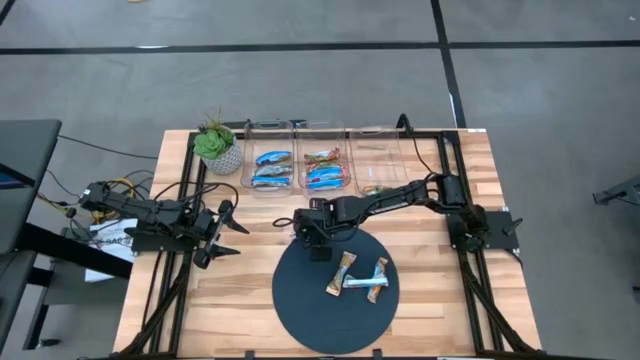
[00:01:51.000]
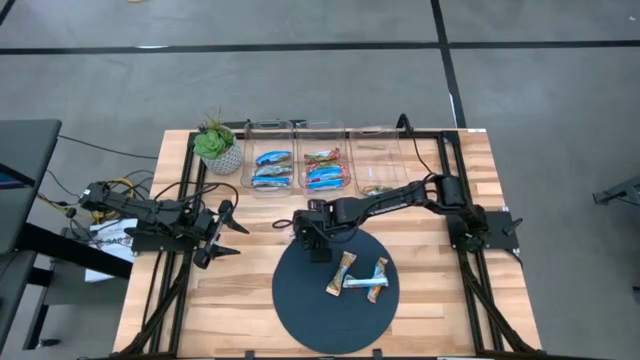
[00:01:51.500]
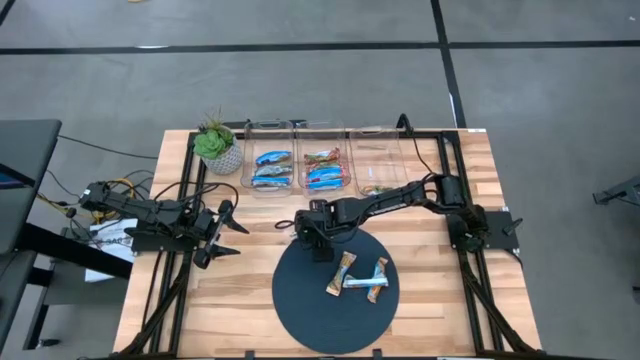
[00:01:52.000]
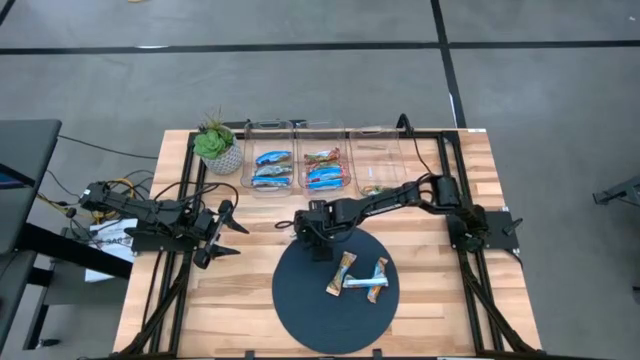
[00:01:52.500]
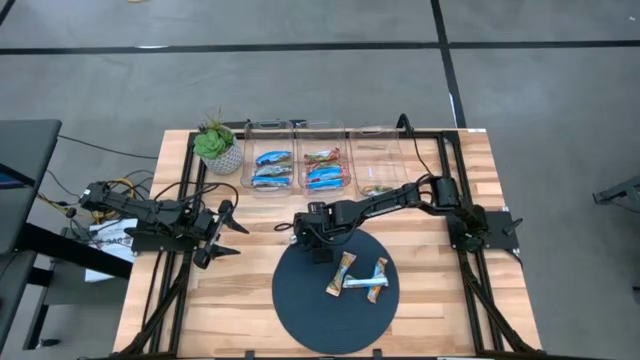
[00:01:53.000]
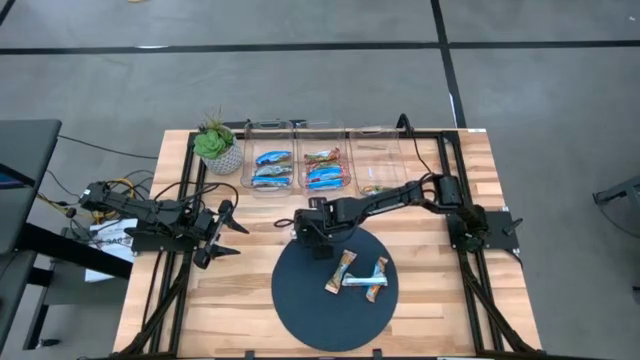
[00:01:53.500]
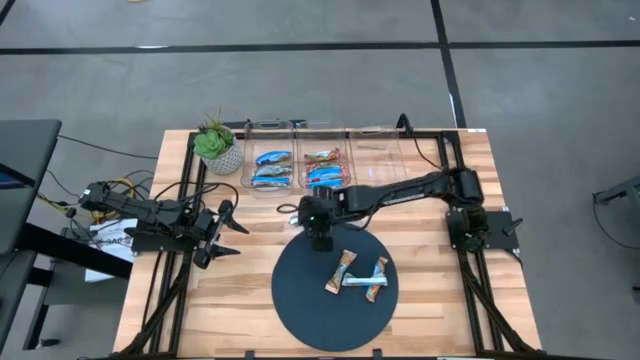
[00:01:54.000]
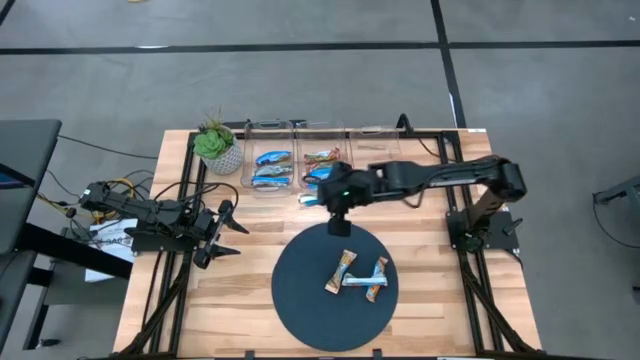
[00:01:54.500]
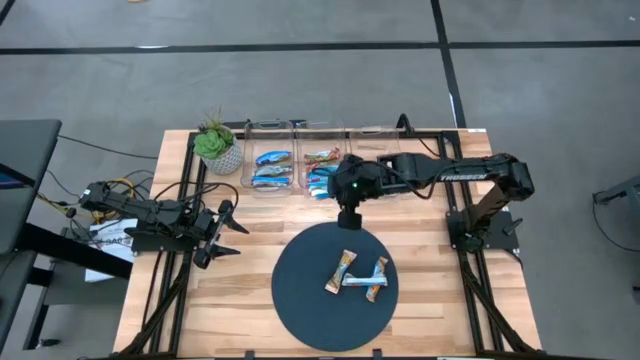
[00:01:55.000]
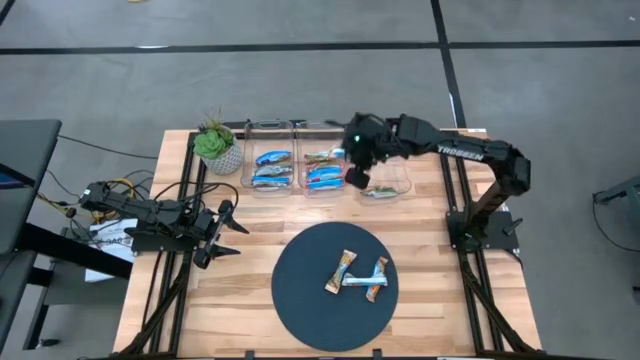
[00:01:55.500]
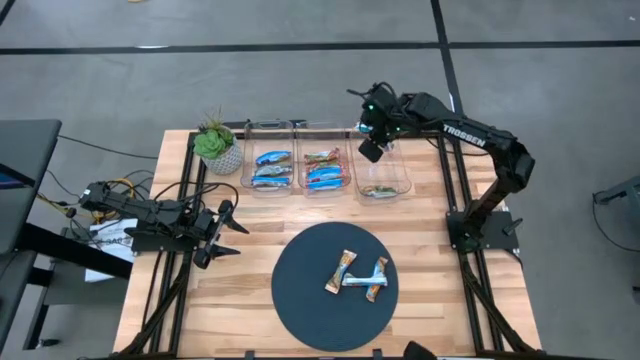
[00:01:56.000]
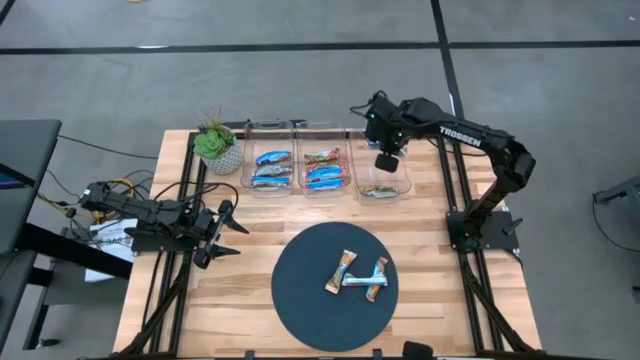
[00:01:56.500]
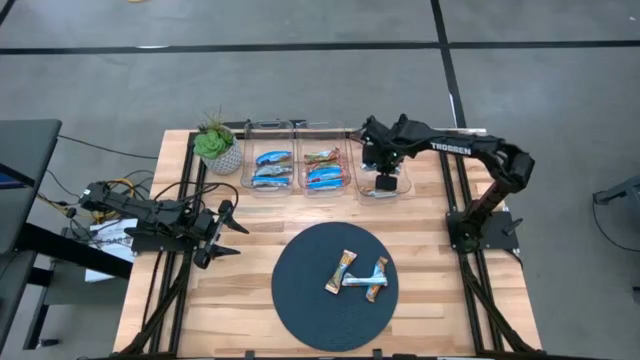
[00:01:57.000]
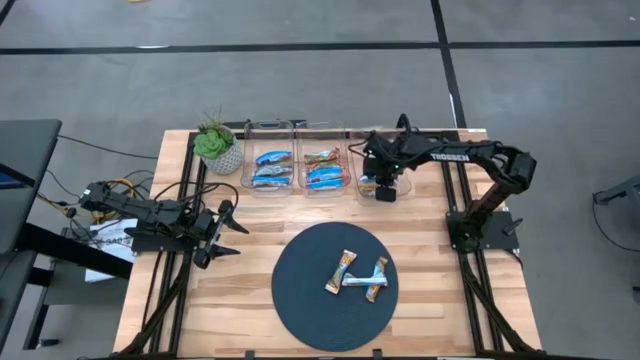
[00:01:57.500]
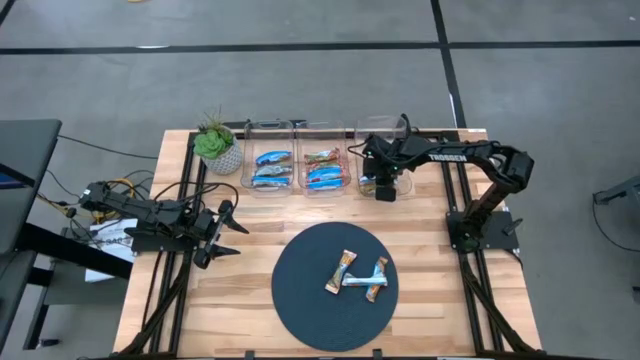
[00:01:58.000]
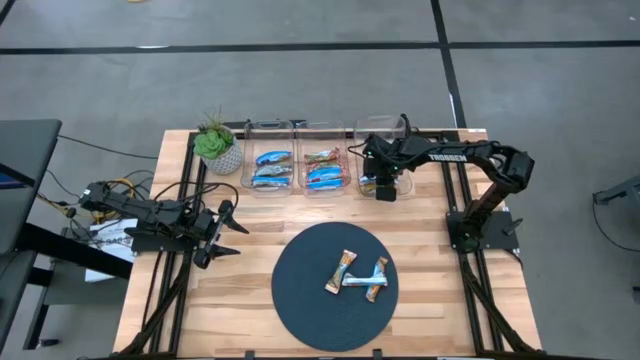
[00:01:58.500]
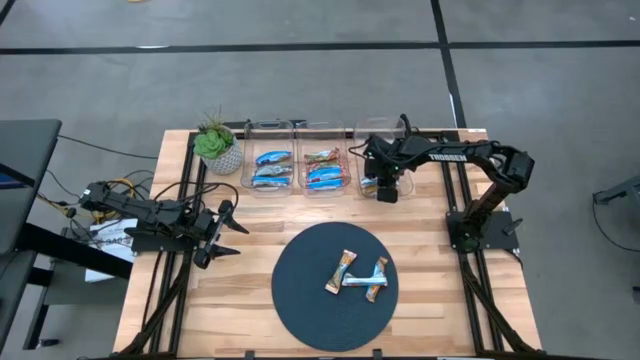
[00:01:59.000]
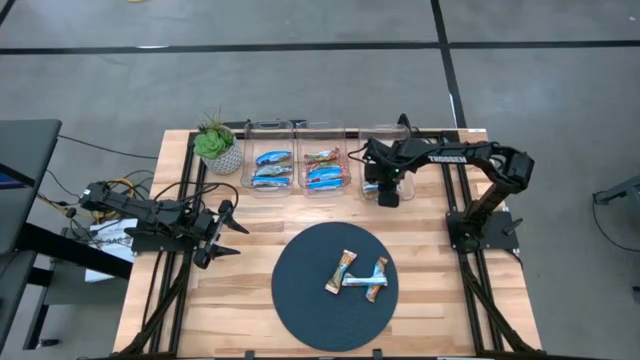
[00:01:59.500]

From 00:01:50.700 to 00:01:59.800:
Task: Pick and place Granola Bars by type
Put the yellow granola bar into the right transparent bin

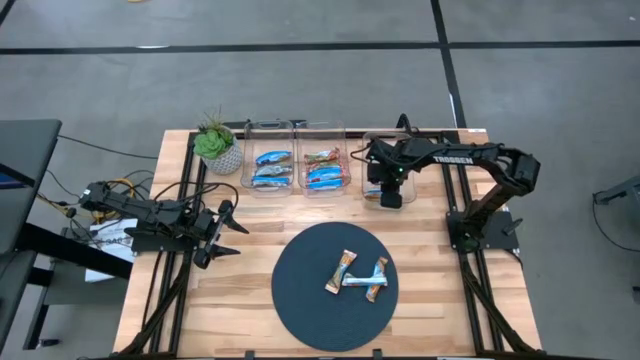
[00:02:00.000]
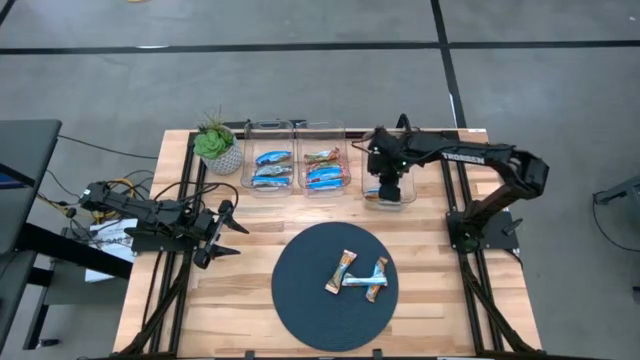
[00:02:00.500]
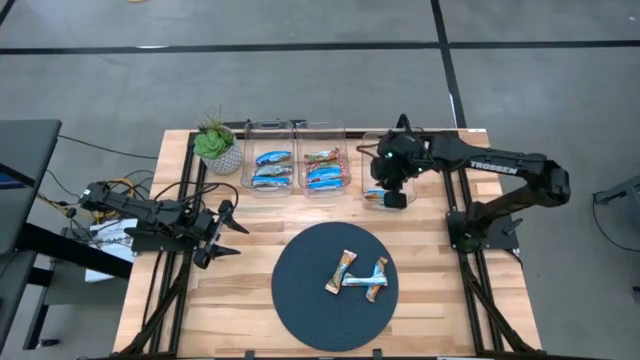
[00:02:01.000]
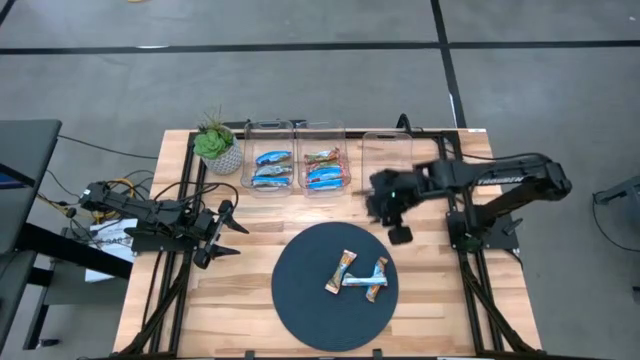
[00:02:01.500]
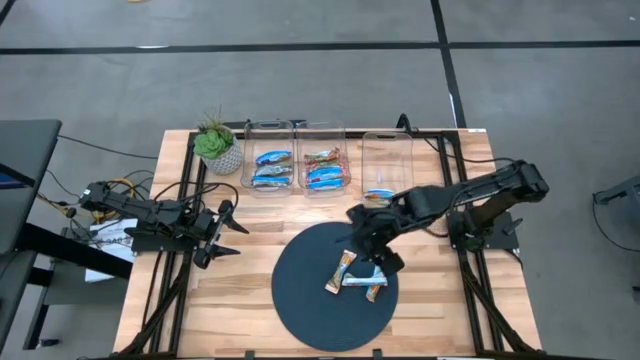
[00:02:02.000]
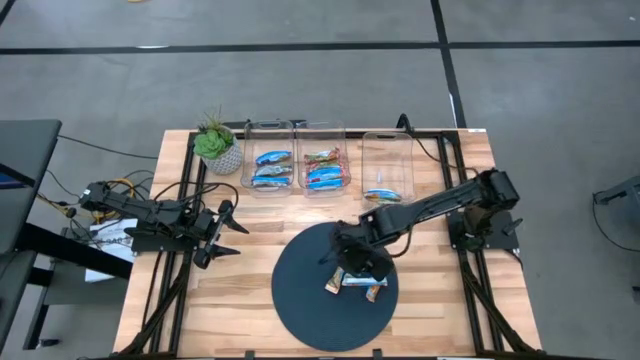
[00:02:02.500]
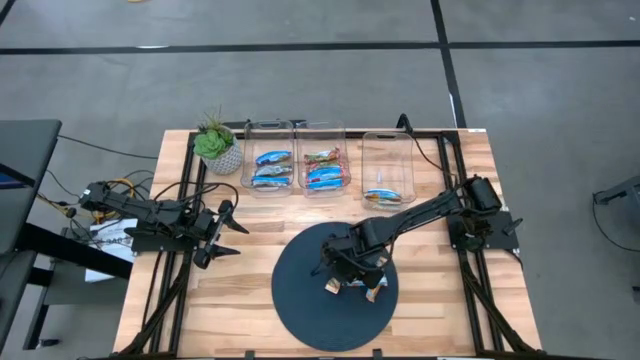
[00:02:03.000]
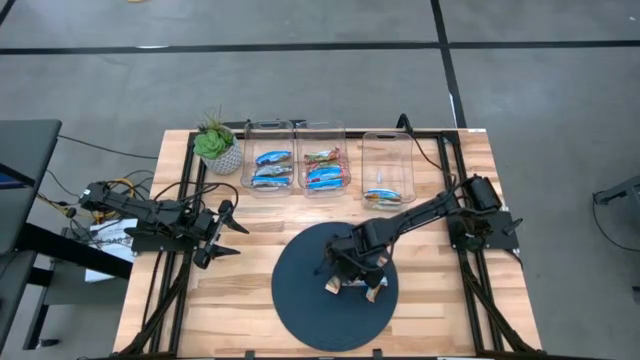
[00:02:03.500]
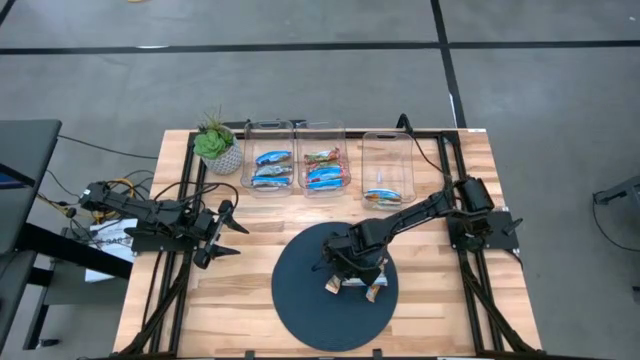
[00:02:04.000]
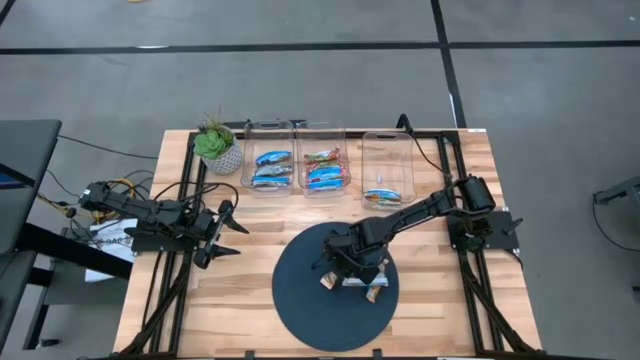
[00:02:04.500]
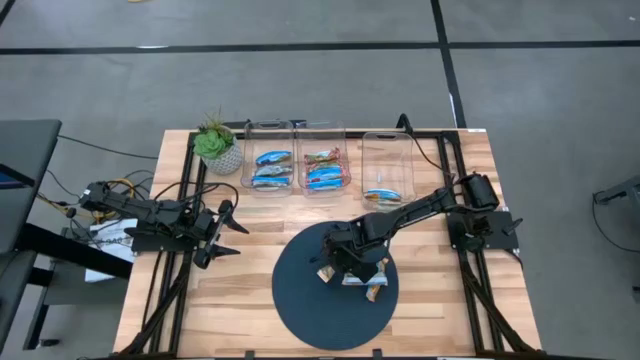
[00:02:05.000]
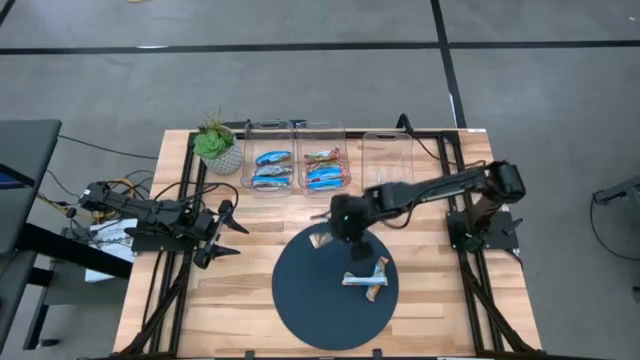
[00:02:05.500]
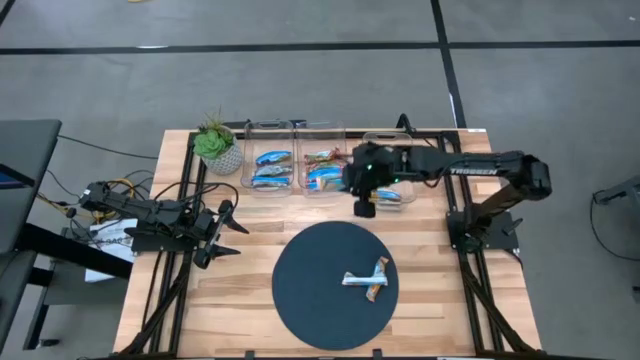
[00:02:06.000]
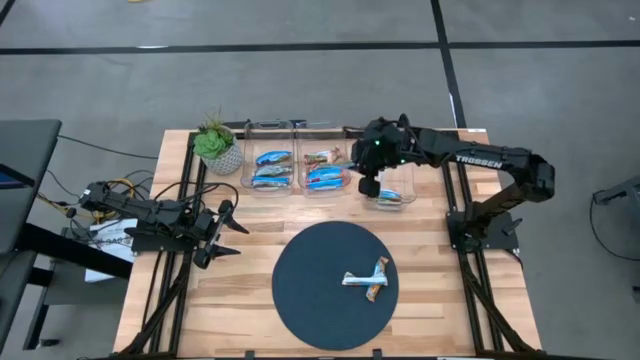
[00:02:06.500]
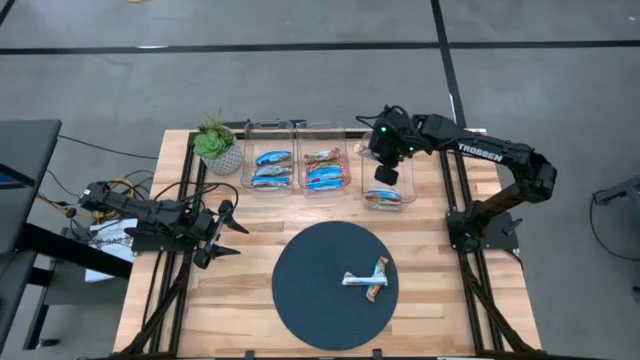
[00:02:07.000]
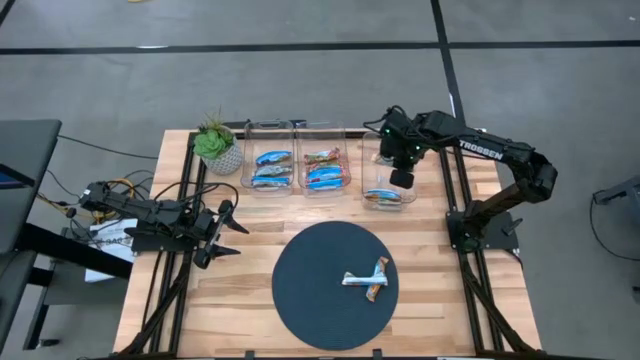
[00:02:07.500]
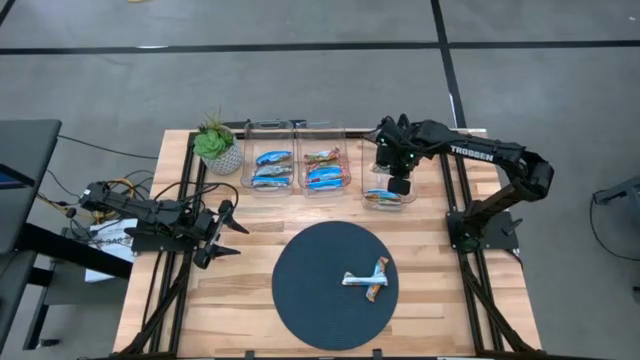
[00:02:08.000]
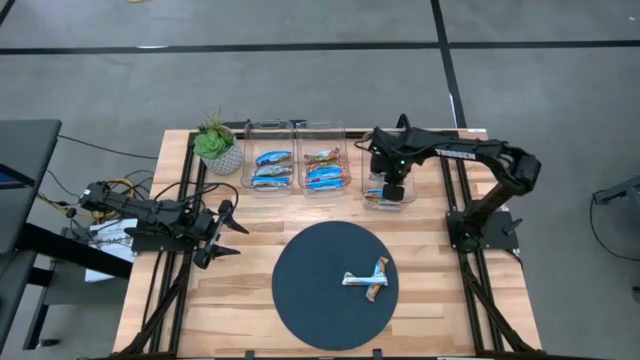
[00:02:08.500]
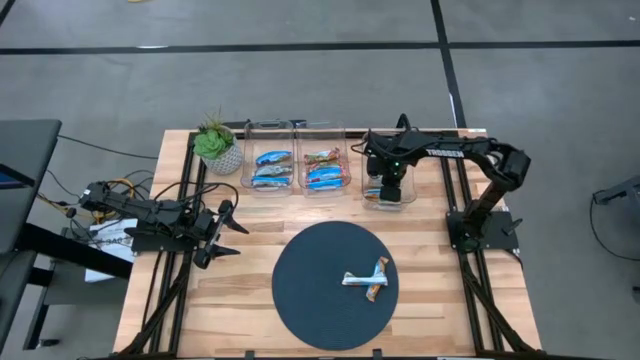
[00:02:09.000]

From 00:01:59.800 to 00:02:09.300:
Put the yellow granola bar into the right transparent bin

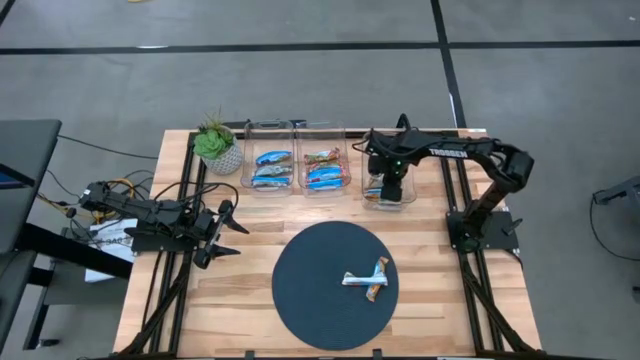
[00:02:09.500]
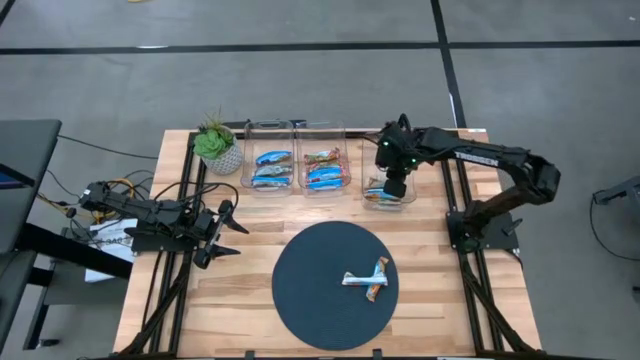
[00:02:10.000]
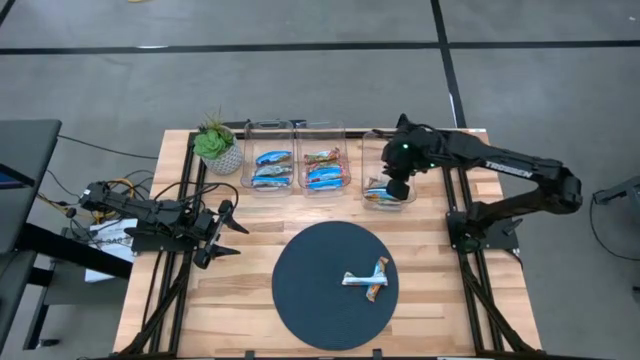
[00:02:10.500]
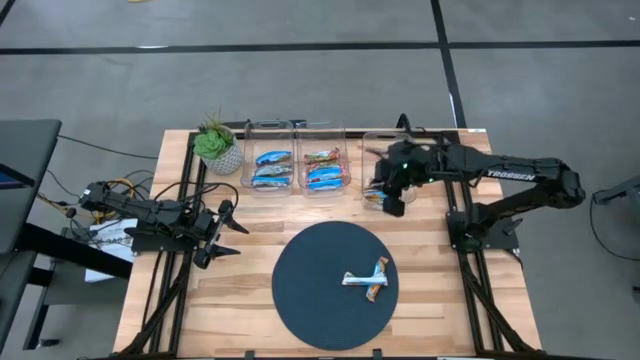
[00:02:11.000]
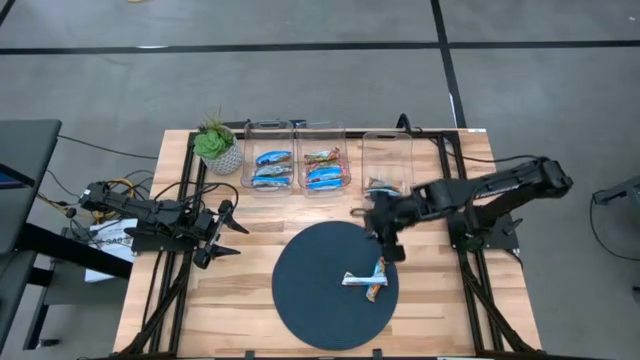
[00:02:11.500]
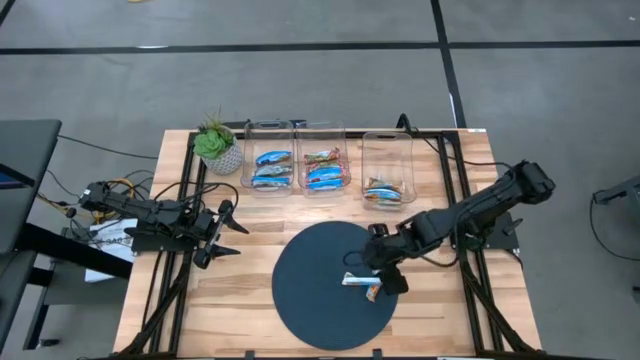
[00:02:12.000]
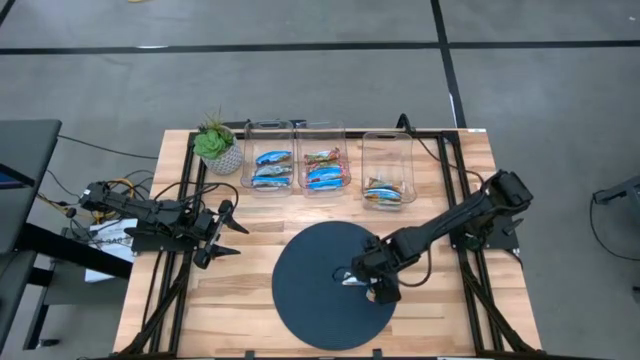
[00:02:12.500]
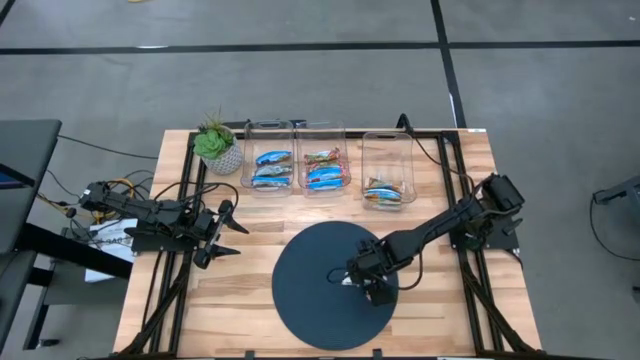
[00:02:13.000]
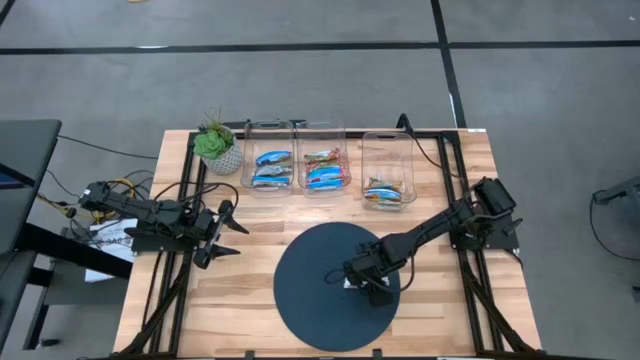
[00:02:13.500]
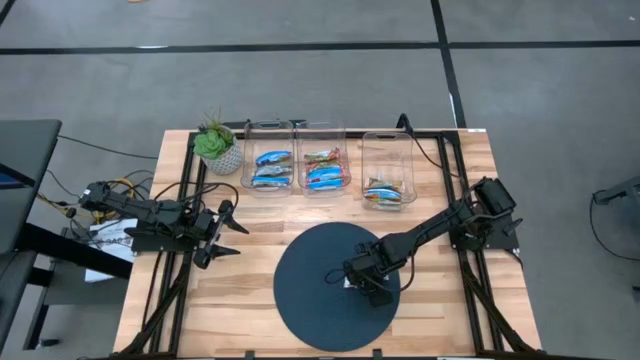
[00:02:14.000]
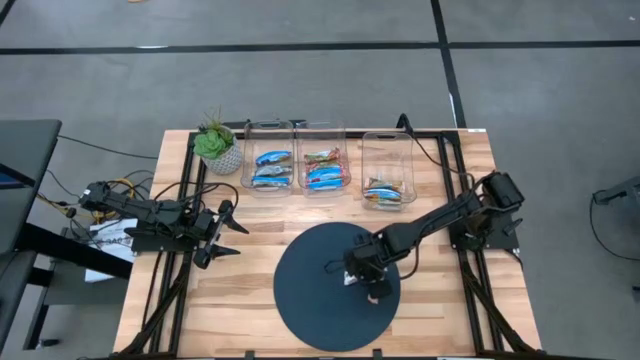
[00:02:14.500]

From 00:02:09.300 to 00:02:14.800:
Put the yellow granola bar into the right transparent bin
